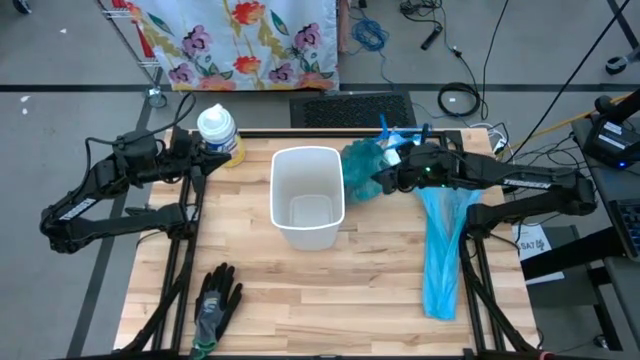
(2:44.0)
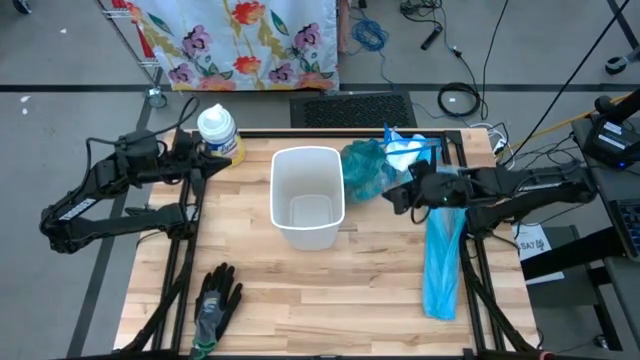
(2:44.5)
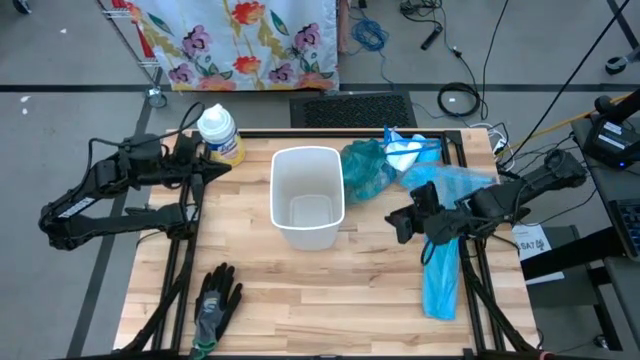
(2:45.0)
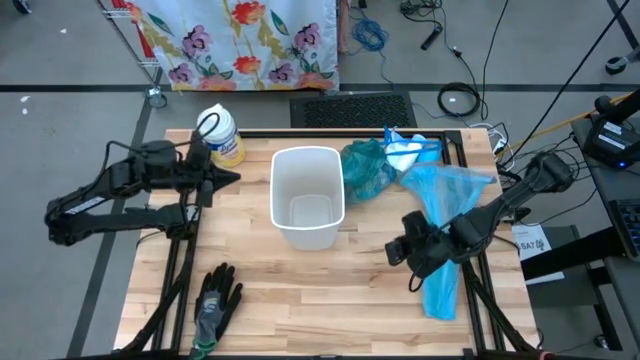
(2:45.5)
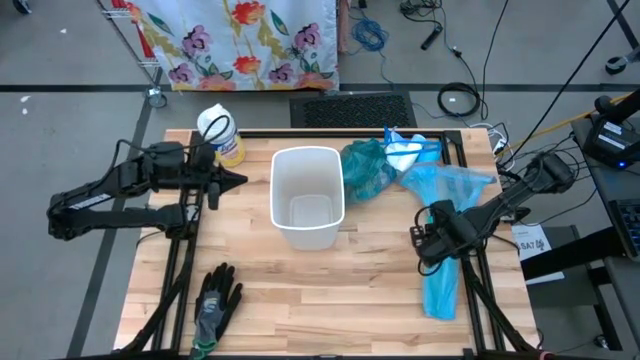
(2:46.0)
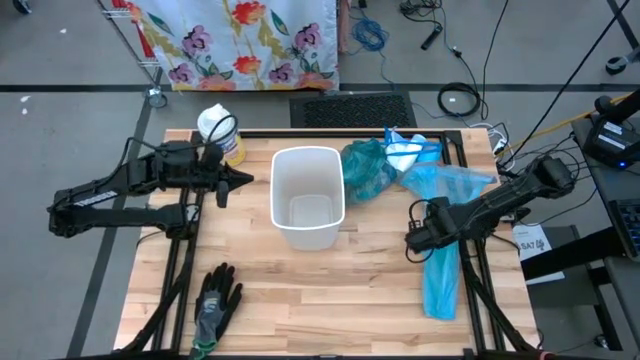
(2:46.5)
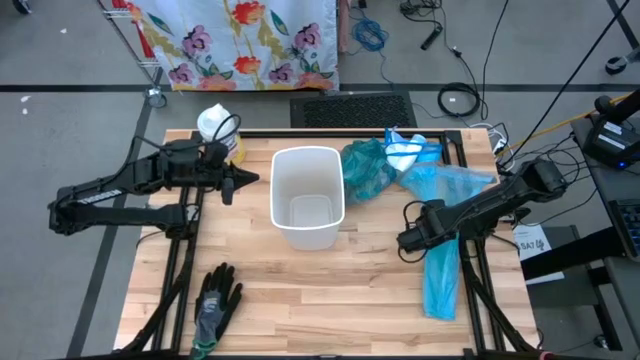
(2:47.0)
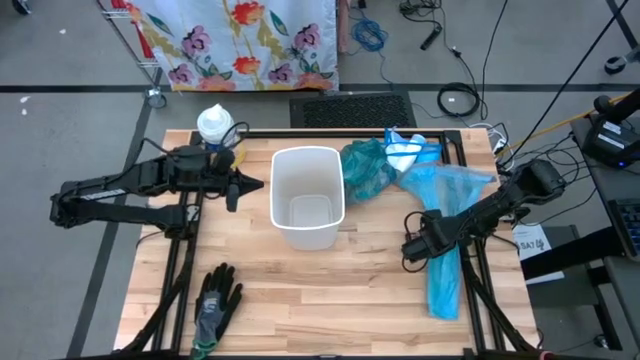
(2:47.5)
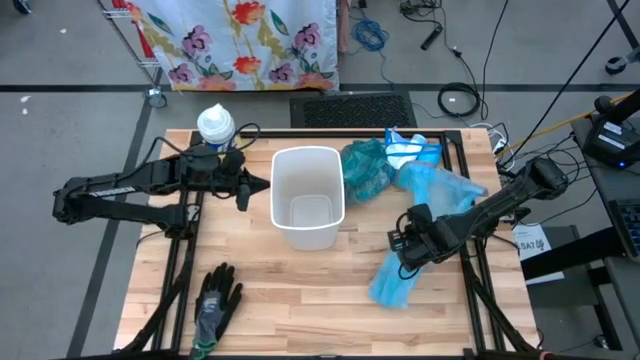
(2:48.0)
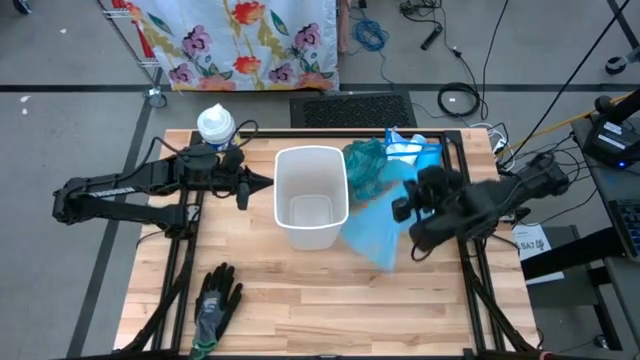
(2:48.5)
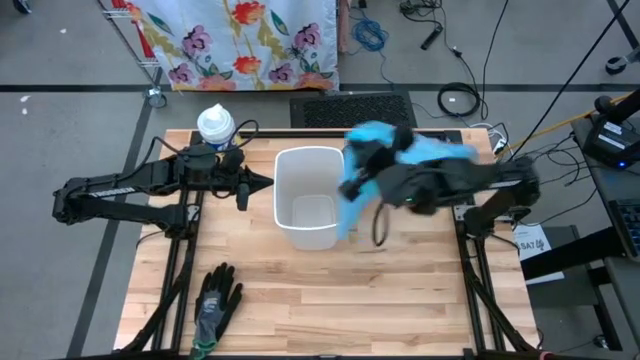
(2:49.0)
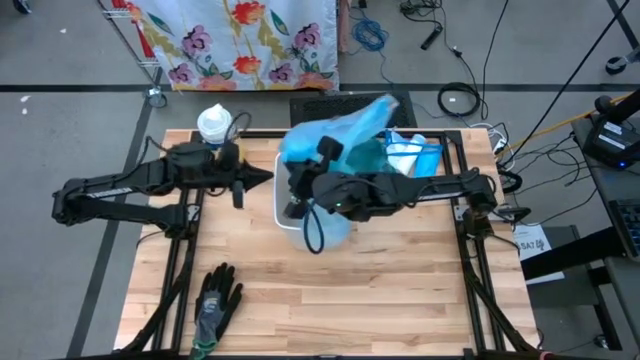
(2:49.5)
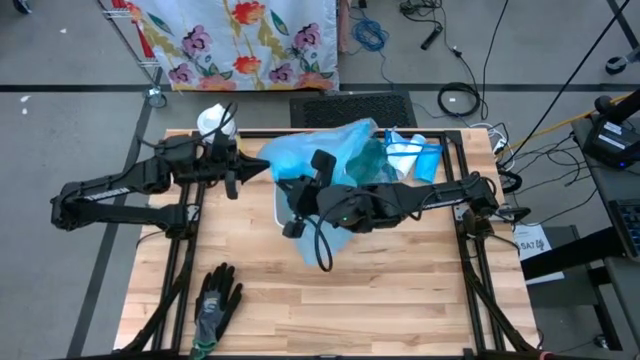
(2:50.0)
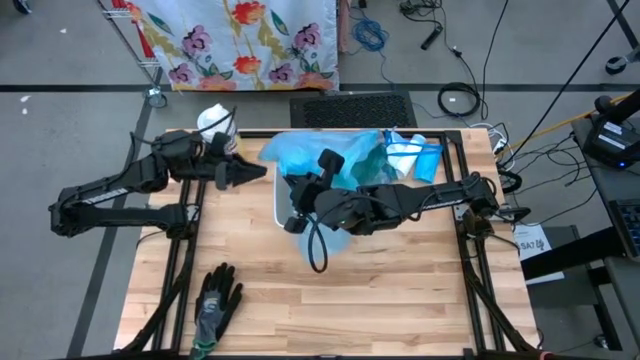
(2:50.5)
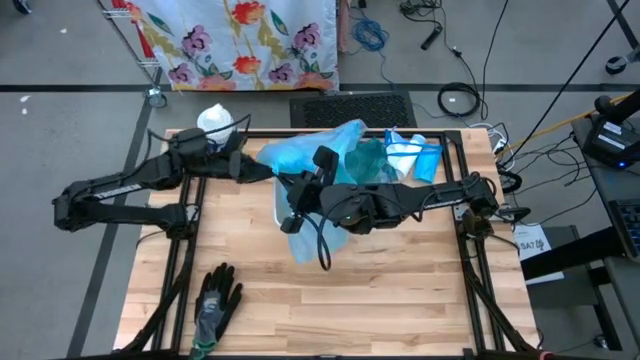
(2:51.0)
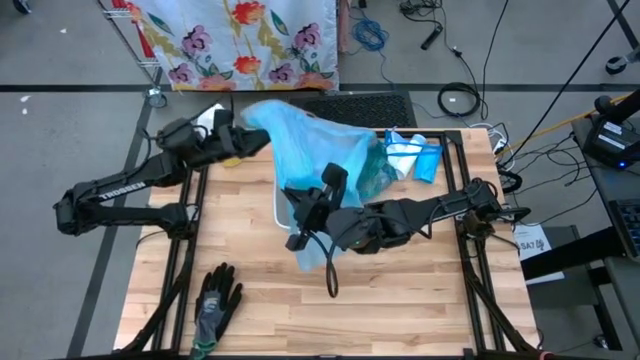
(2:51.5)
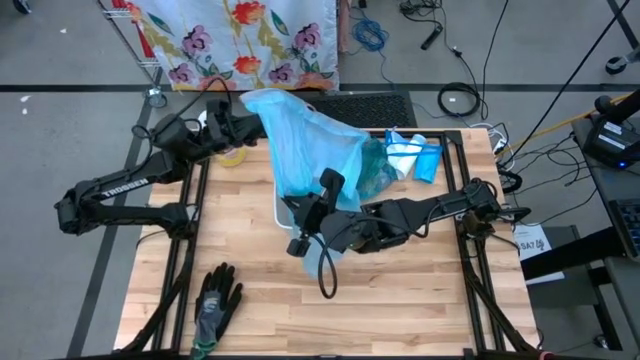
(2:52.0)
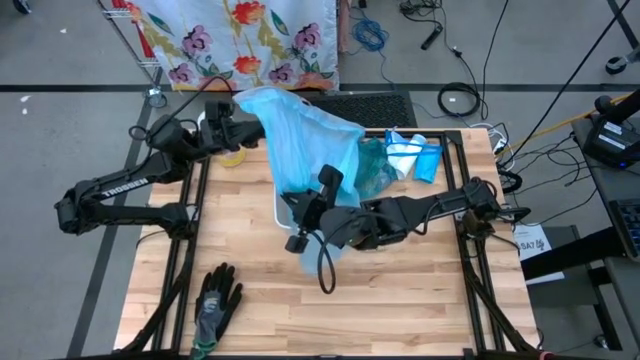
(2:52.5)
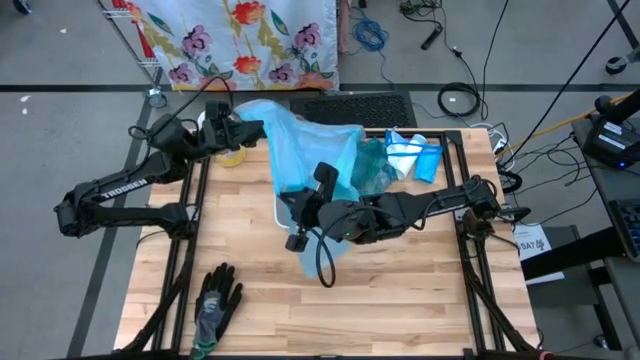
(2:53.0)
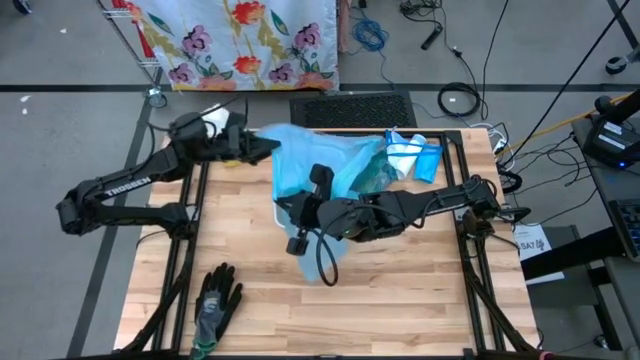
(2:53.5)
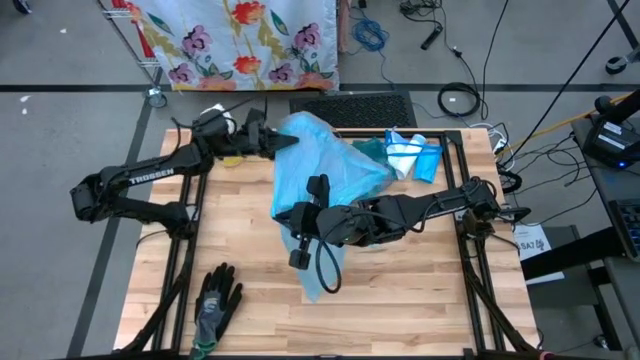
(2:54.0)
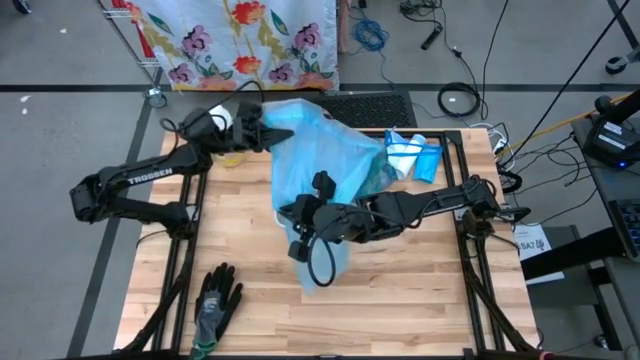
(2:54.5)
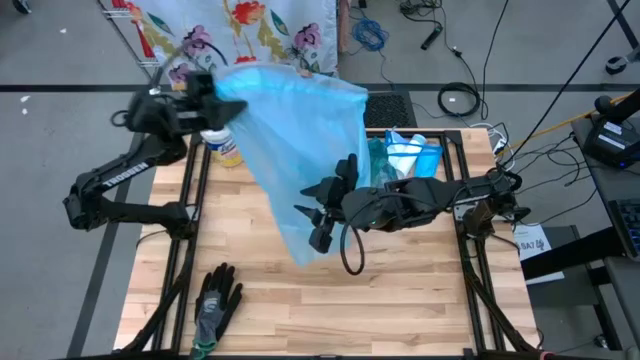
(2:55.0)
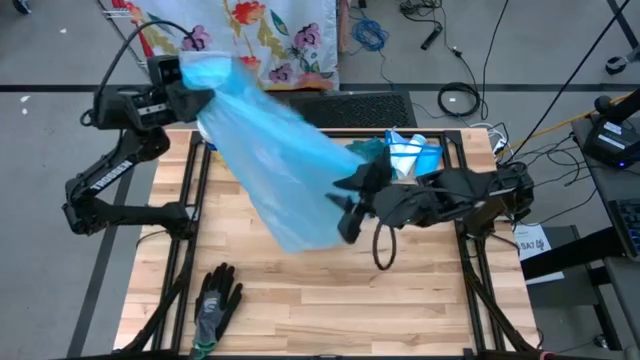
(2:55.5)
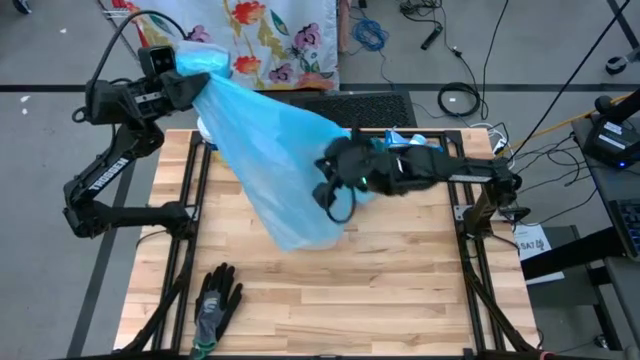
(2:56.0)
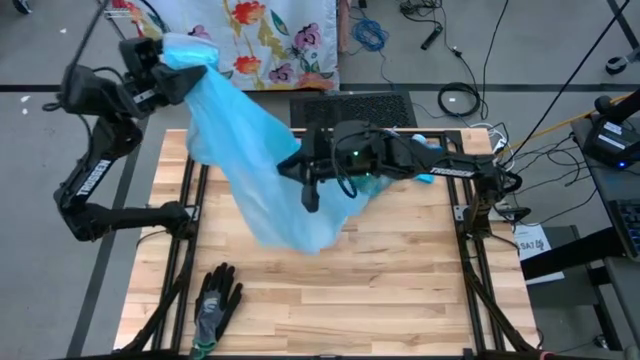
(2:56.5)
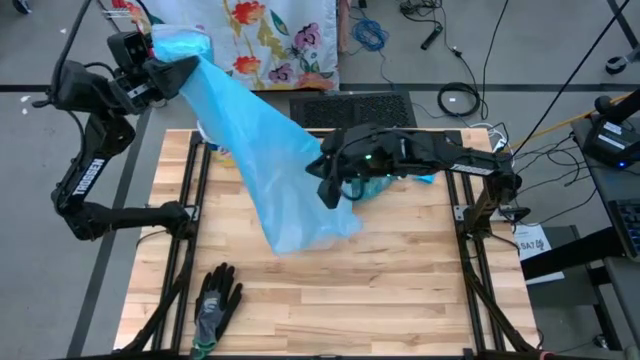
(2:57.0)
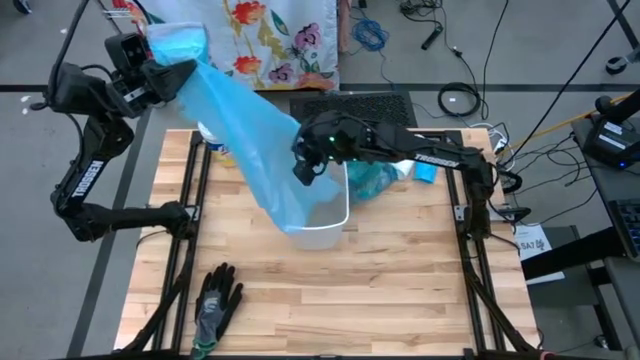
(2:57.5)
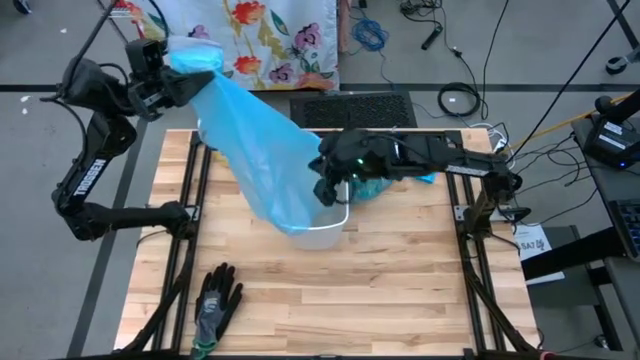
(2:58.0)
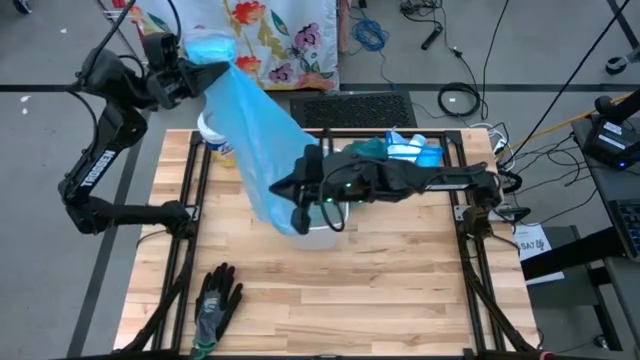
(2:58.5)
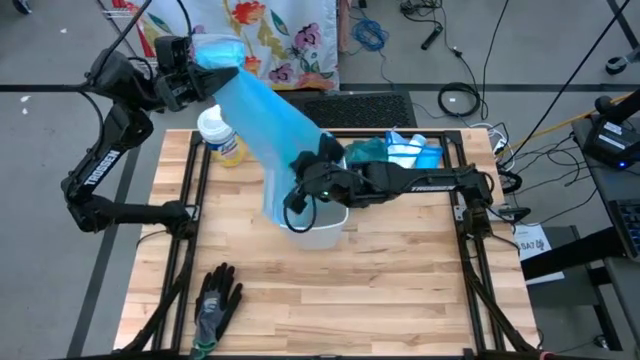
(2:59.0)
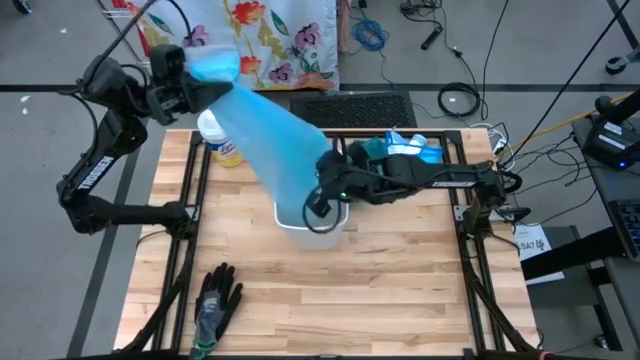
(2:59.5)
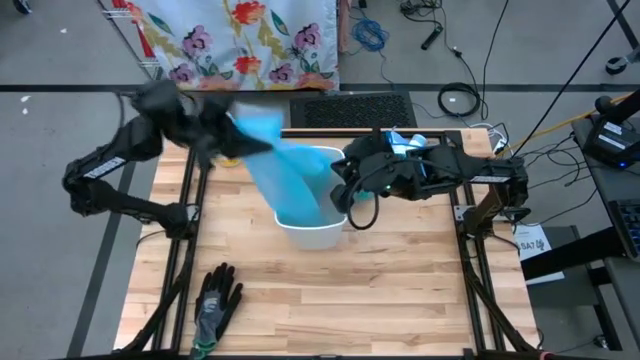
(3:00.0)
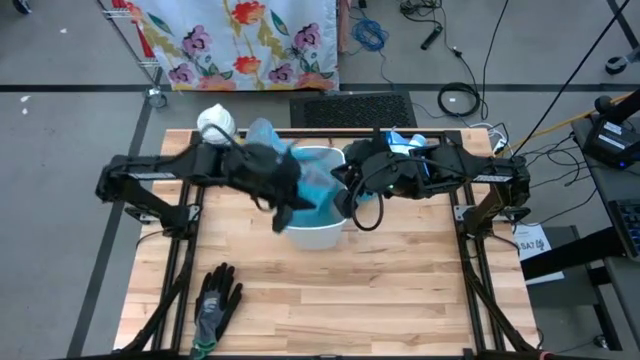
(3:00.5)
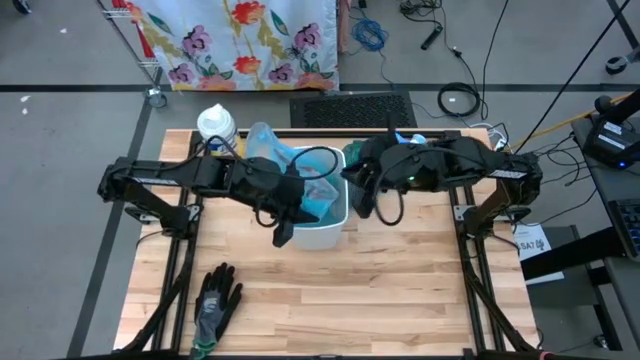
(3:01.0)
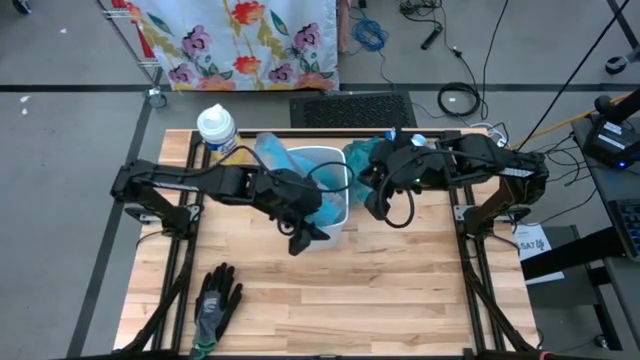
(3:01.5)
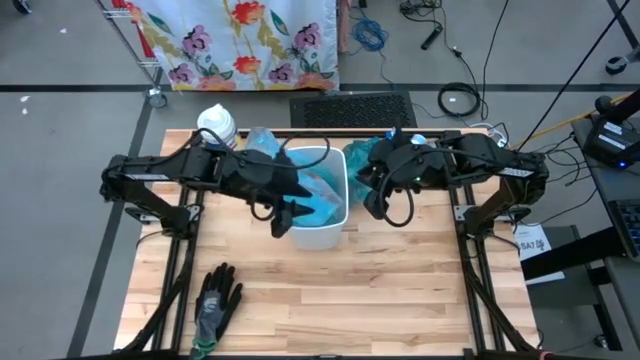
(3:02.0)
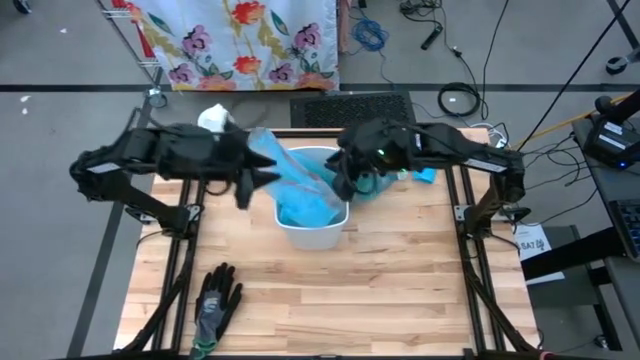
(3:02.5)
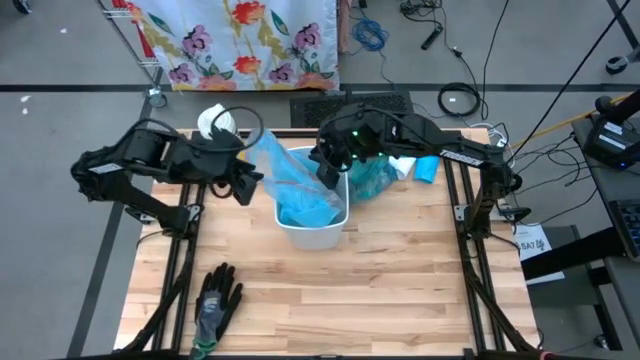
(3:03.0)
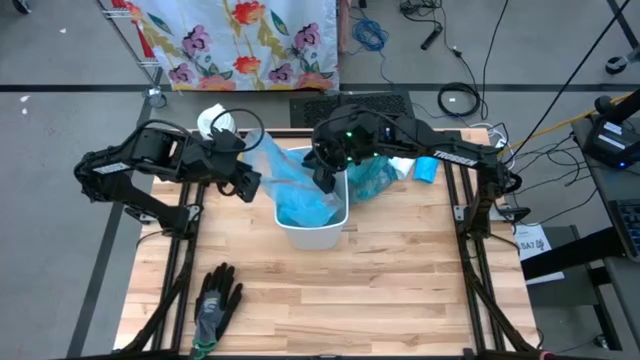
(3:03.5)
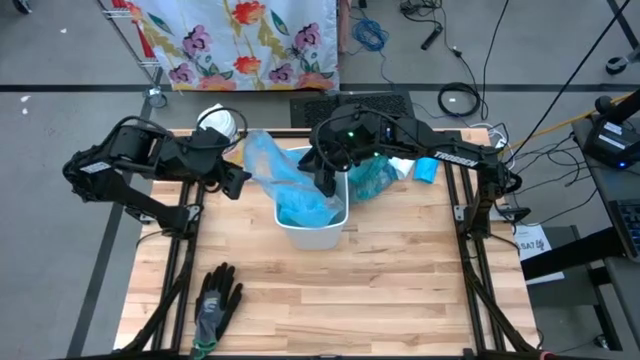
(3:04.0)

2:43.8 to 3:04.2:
Task: place trash/remove bag and relplace
Insert the light blue trash bag into the white trash bin

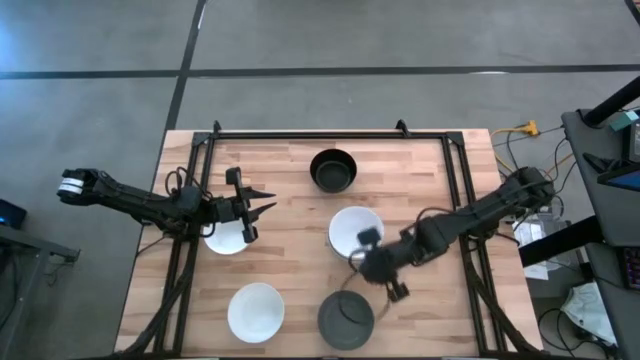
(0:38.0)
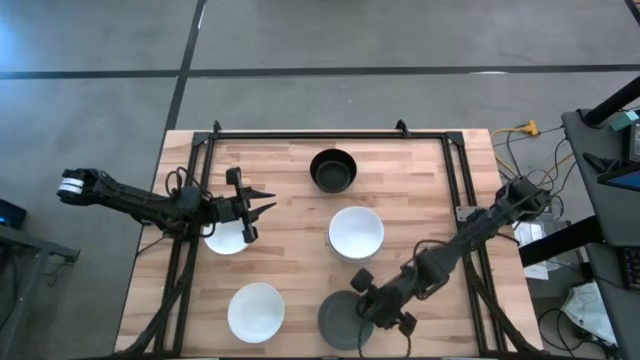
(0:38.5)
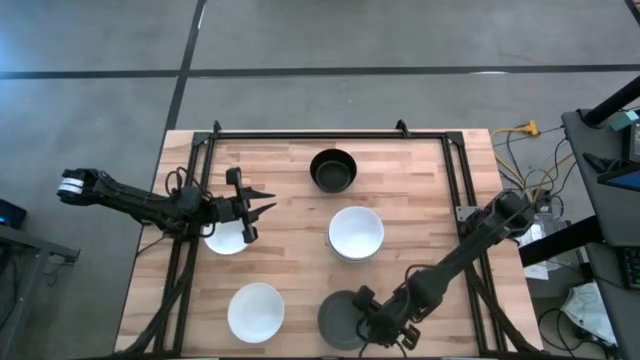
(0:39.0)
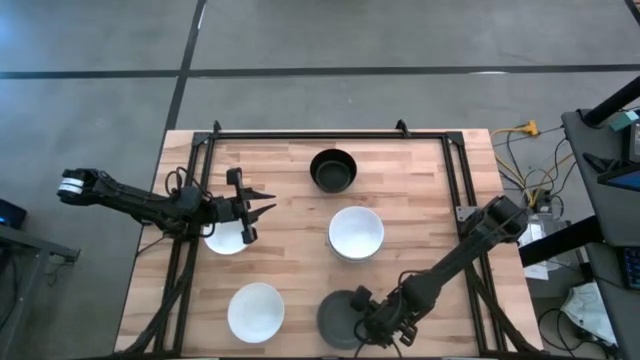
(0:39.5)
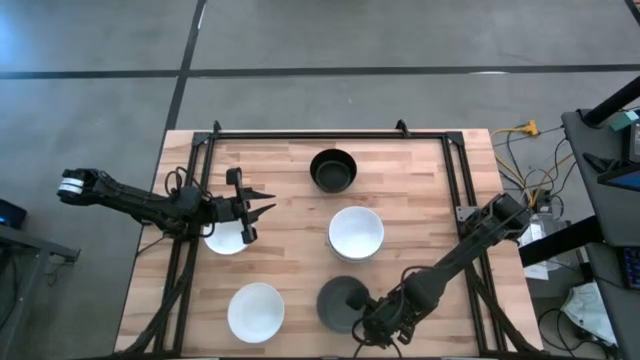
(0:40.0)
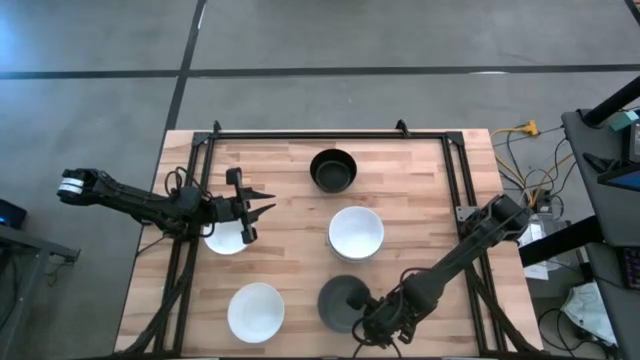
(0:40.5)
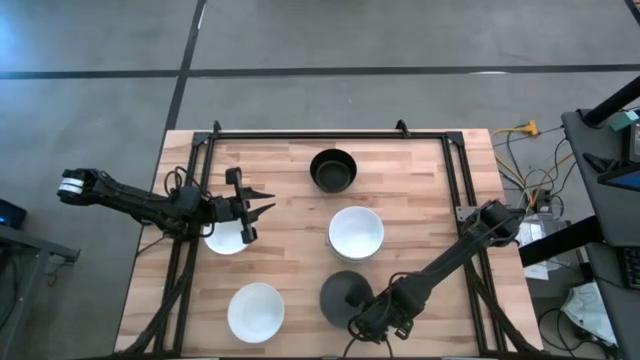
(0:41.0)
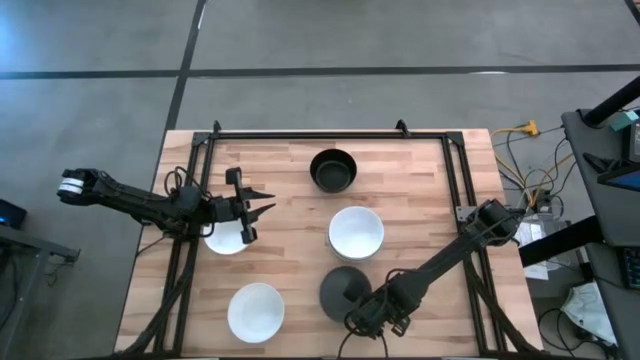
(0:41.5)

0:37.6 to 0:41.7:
Task: Nest bowls inside each other
Stack the green bowl on top of the white bowl
